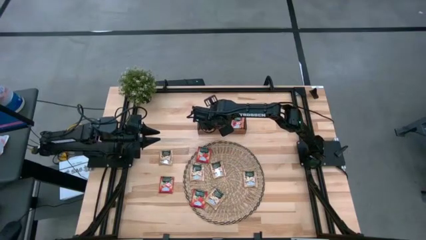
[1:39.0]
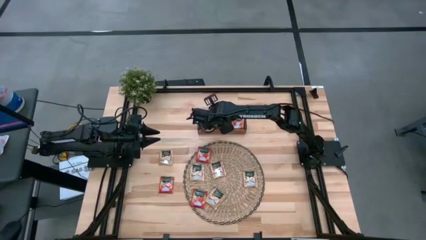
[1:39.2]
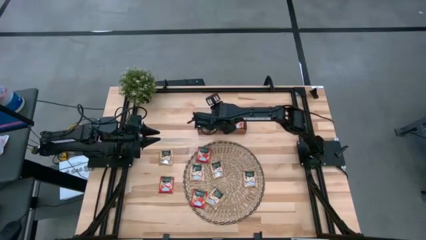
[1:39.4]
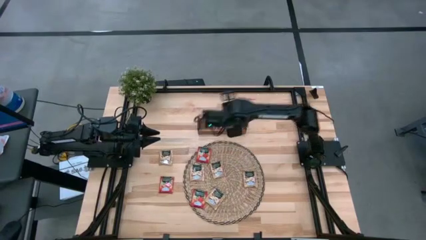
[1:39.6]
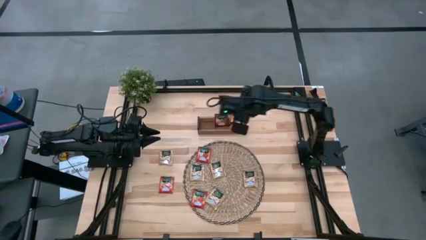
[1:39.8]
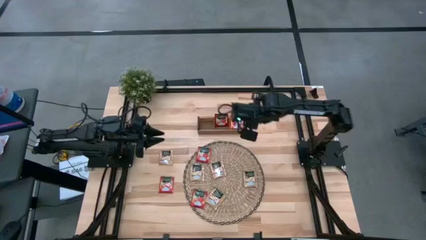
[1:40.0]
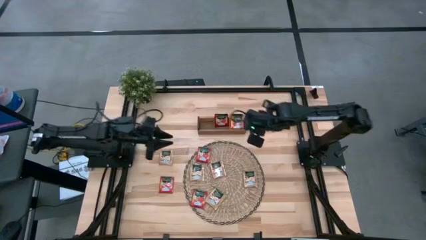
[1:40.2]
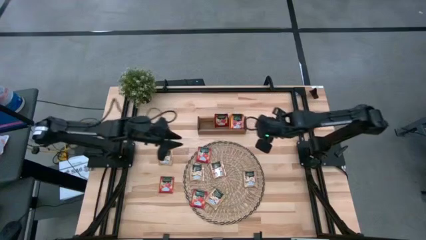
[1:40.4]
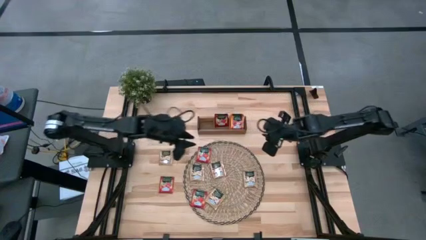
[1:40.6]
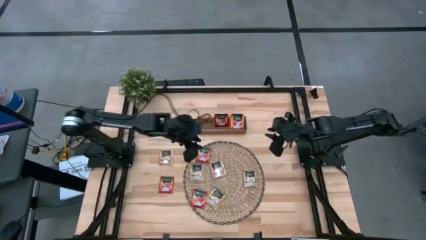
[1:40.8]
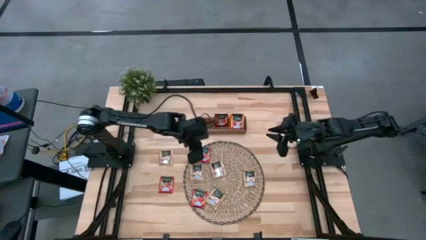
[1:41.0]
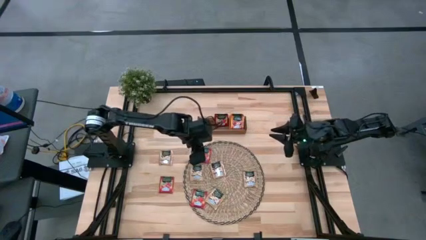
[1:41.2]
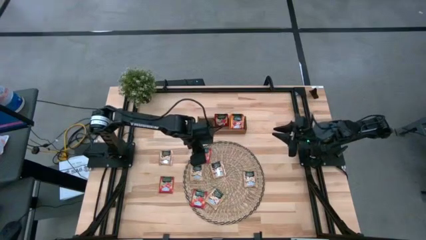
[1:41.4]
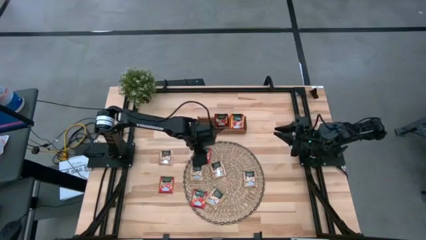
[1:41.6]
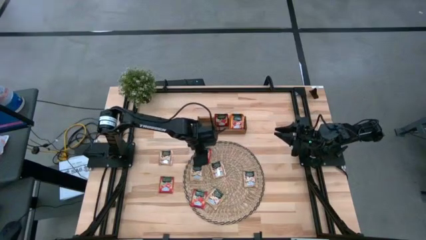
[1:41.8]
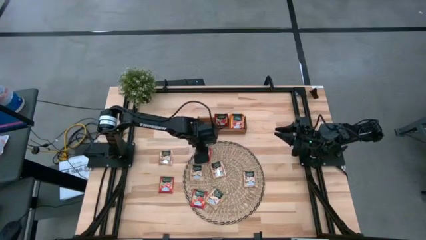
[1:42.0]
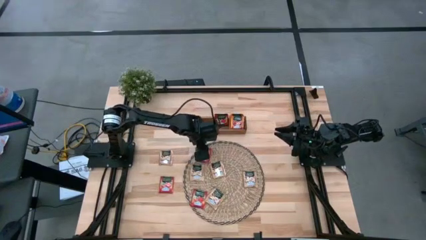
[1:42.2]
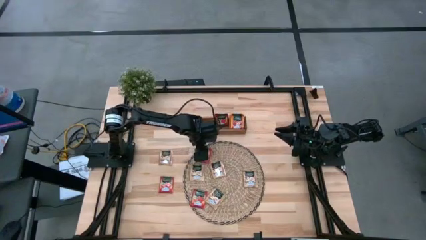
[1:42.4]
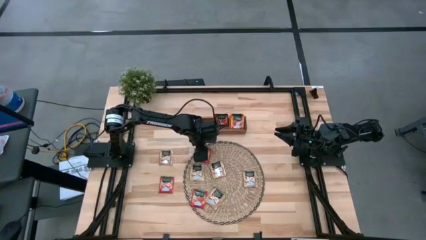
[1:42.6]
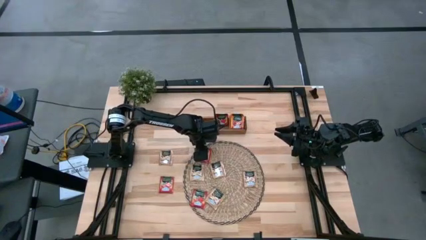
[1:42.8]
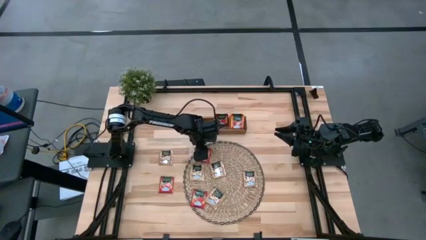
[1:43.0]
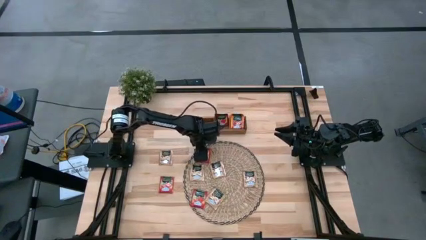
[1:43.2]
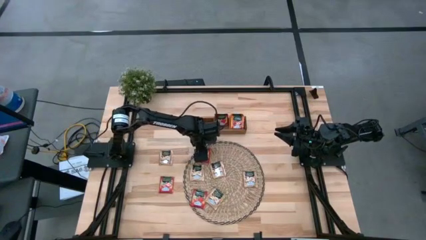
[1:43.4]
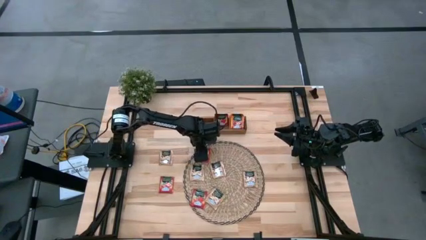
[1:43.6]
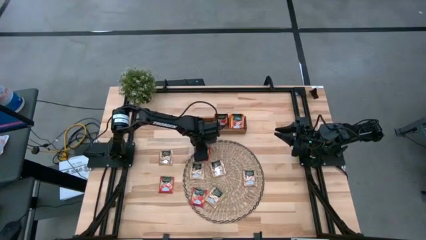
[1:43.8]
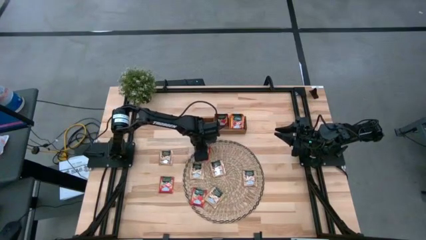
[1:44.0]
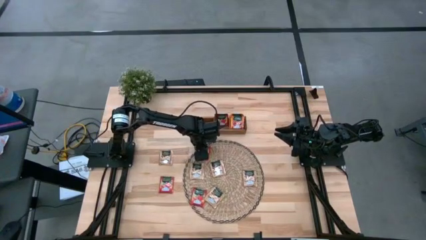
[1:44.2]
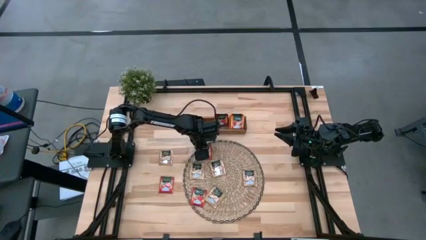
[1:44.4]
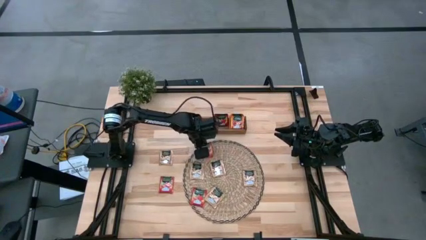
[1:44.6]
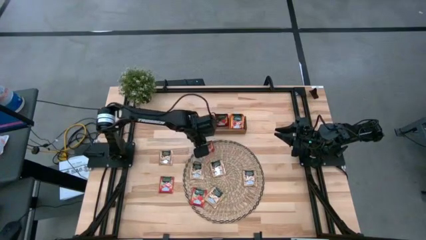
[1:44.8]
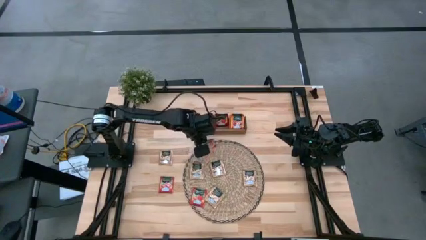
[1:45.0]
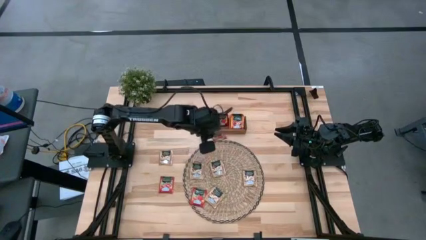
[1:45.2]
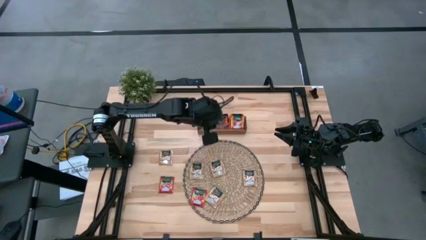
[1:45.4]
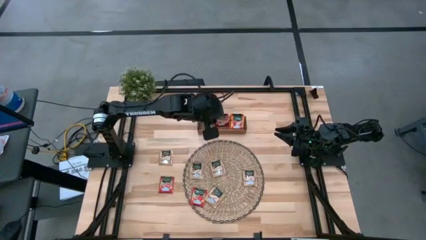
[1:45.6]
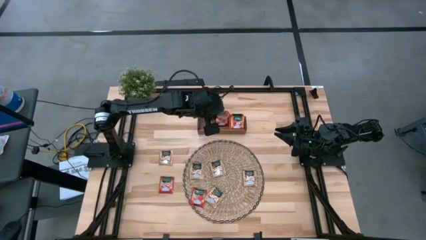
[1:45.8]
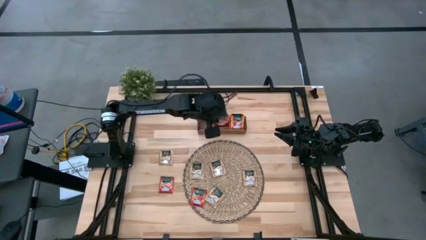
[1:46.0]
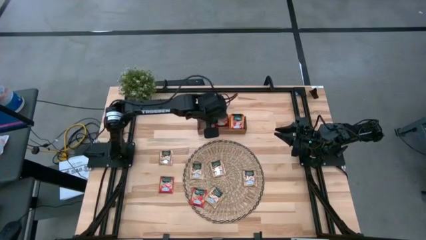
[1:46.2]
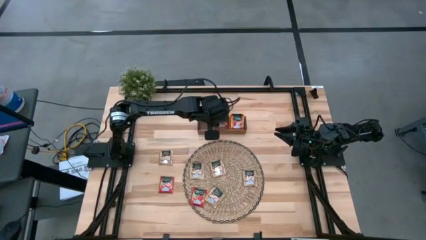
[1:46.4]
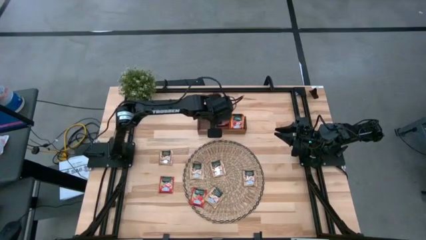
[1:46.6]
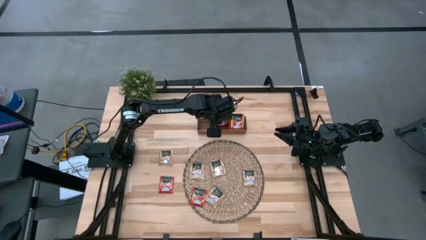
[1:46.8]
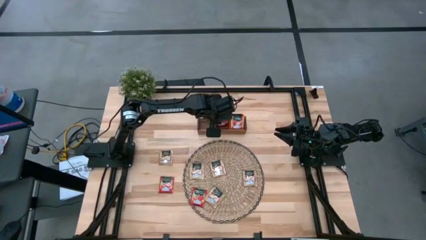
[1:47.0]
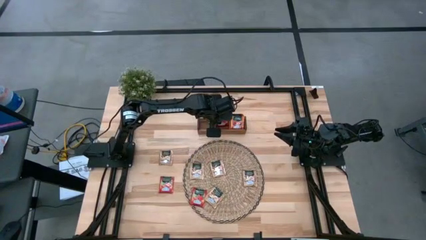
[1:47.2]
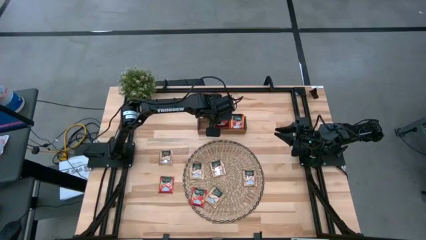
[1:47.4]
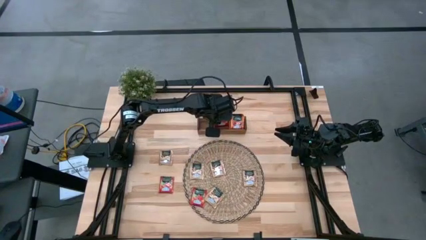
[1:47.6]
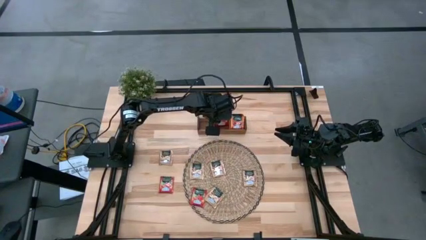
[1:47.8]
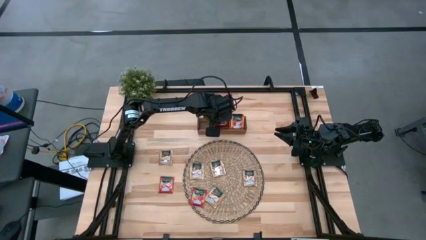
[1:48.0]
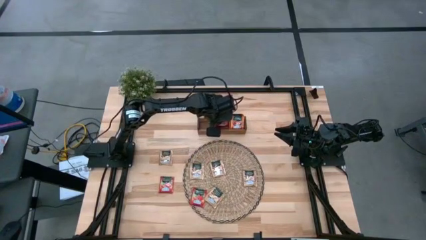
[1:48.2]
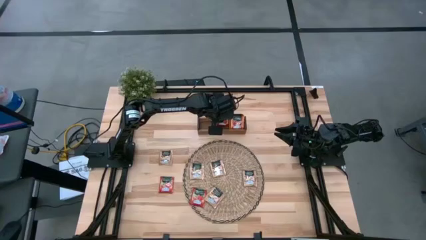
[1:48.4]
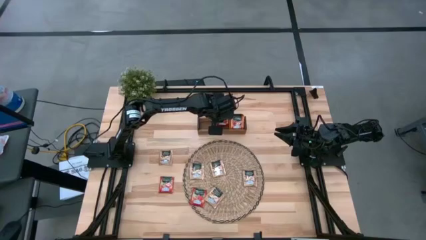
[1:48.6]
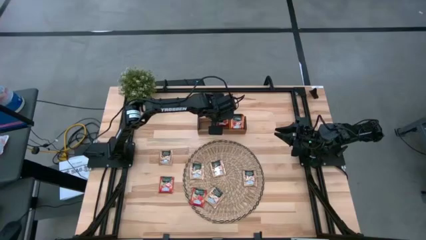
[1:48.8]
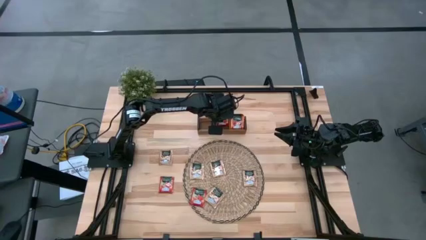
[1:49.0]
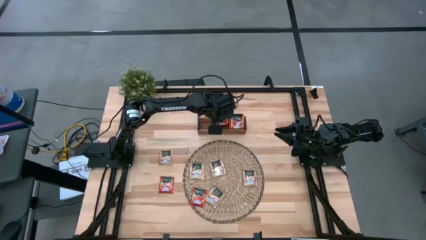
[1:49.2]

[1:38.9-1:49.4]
Task: Pick & Place Tea
Put the red tea bag in the middle of the wooden organizer

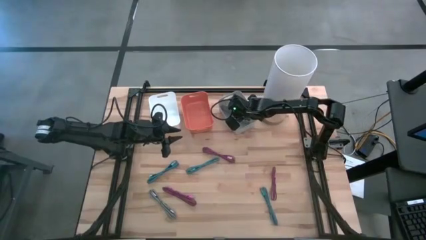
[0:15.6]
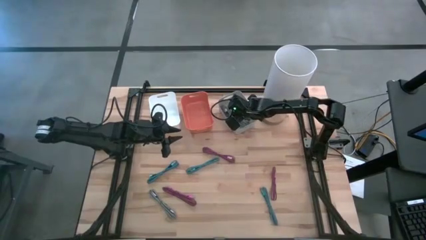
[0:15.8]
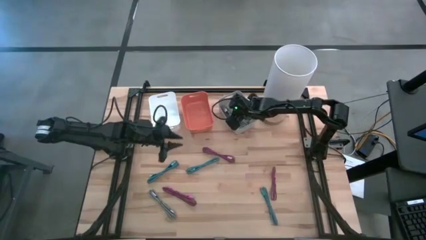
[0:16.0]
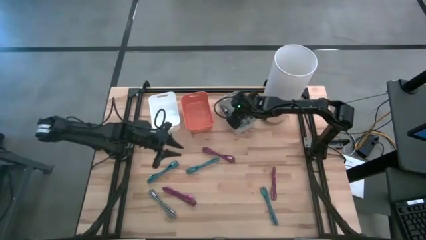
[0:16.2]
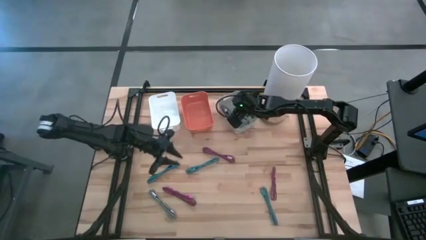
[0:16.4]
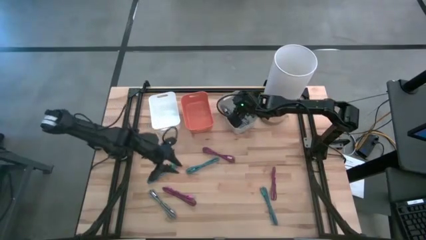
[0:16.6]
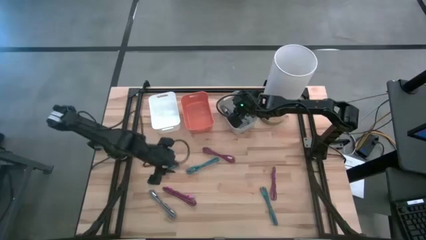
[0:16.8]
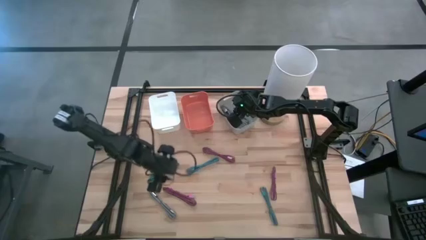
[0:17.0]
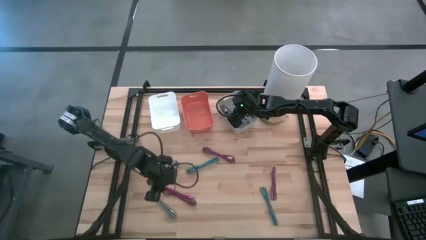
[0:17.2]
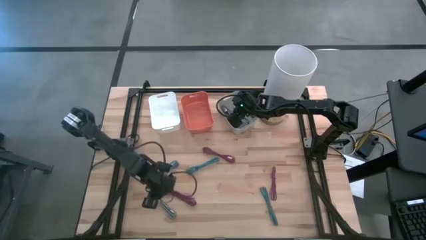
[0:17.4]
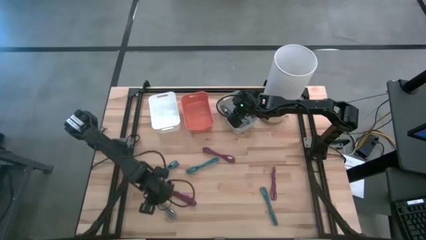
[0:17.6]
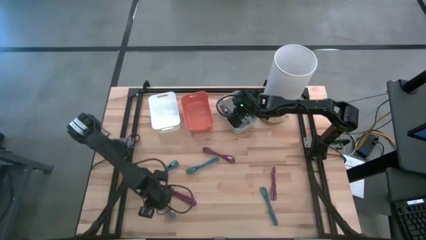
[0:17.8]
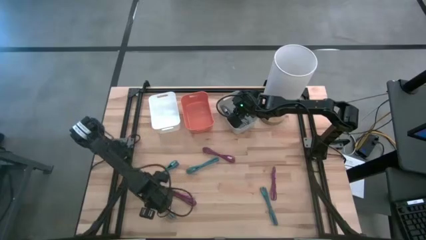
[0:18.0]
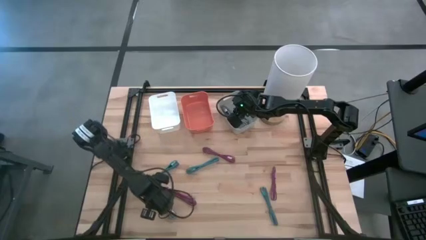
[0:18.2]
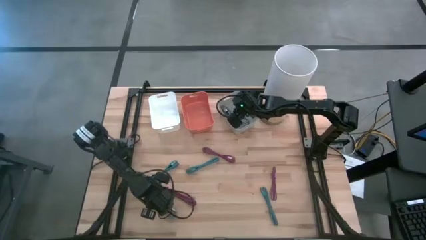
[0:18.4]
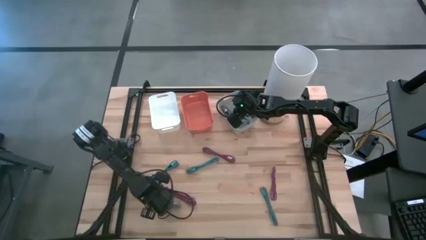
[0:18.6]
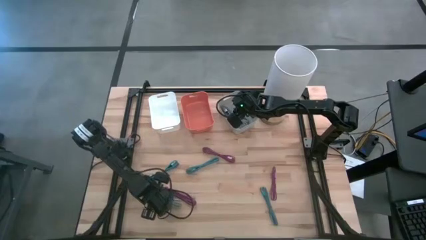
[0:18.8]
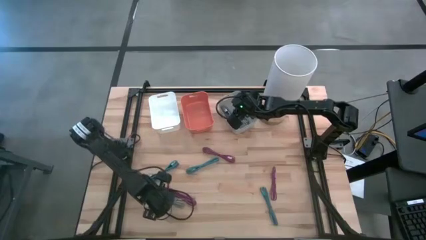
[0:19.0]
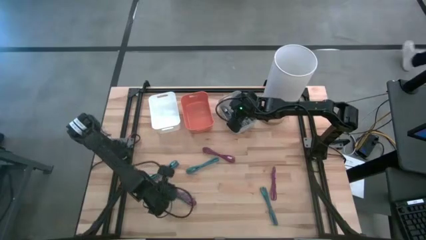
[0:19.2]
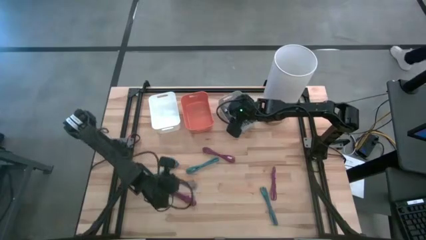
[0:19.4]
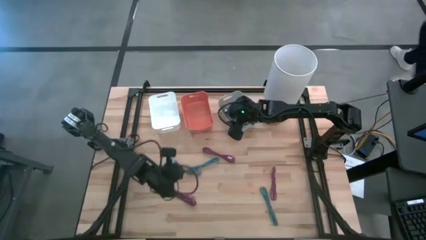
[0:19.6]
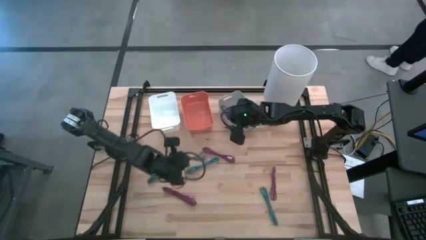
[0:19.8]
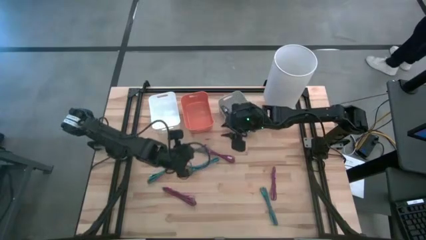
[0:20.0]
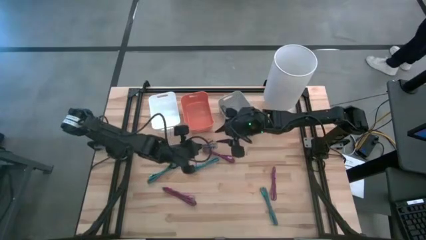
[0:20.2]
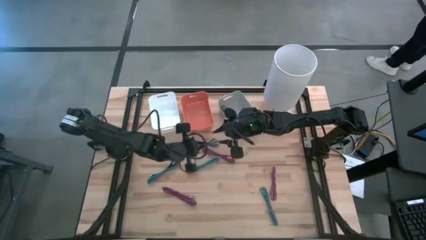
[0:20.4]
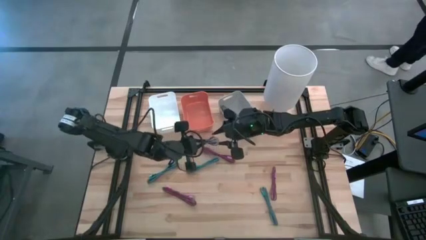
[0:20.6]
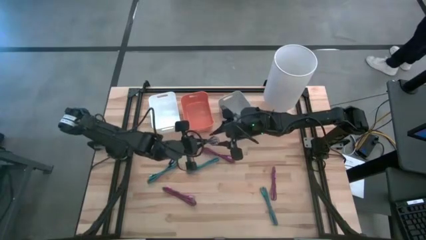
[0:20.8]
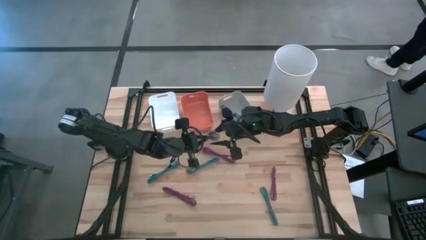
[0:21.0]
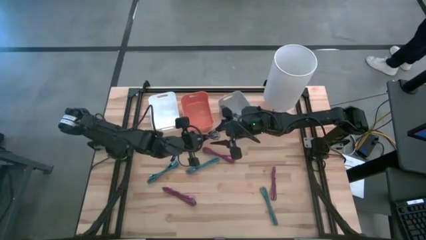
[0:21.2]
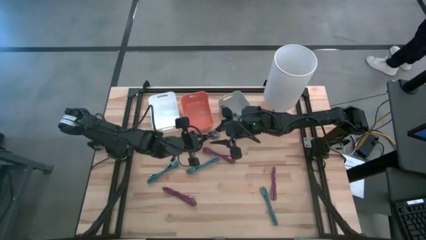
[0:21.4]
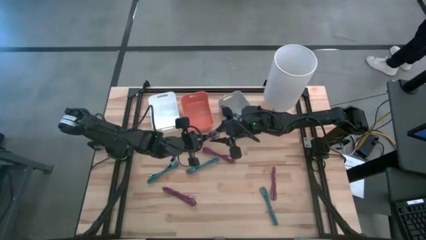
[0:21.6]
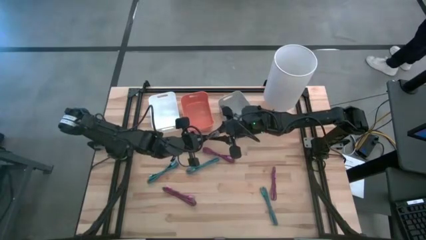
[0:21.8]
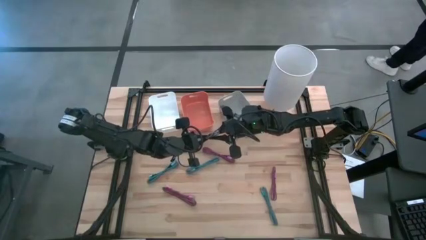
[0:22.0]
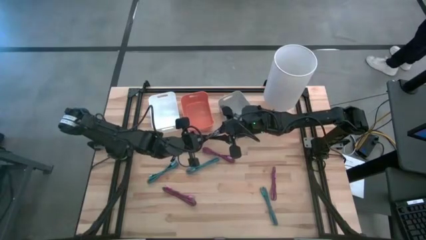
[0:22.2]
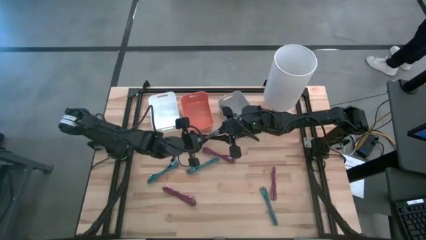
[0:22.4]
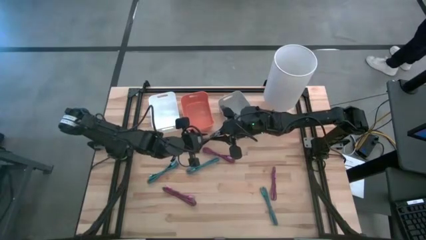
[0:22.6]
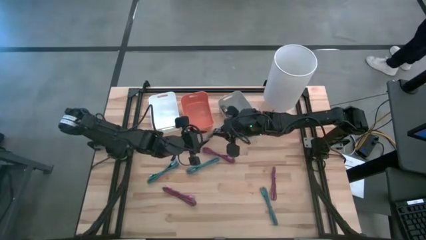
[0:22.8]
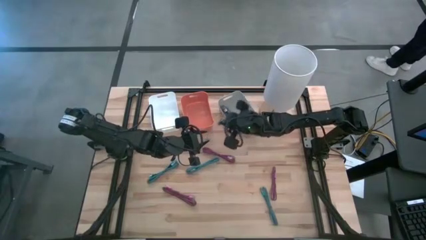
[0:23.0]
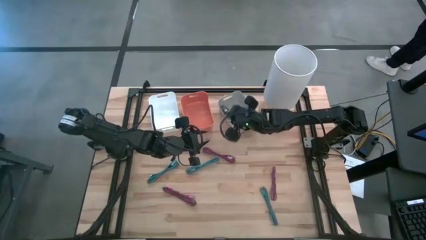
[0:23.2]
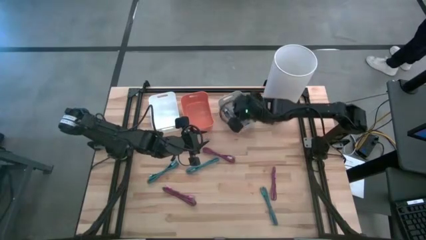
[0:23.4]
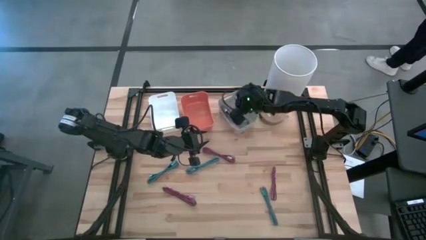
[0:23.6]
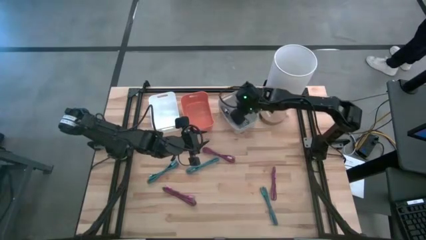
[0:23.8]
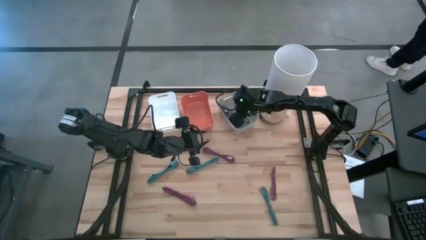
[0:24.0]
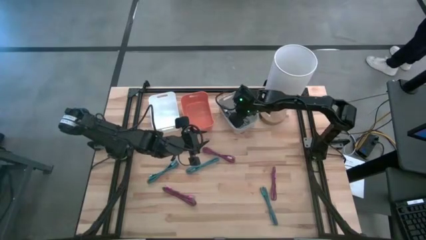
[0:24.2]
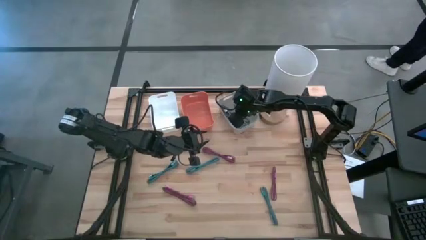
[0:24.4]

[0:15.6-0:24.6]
Task: Pick & Place USB Port
Put the black and white USB cable into the gray bin
